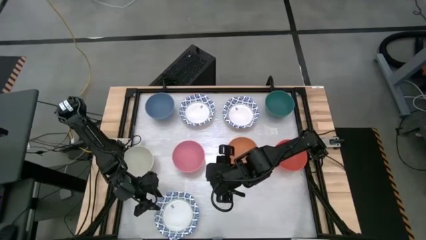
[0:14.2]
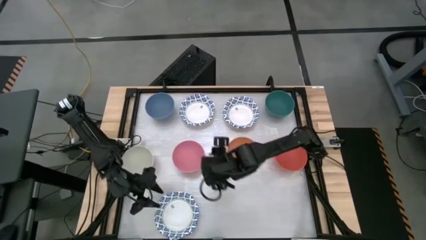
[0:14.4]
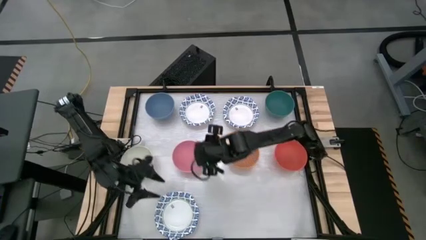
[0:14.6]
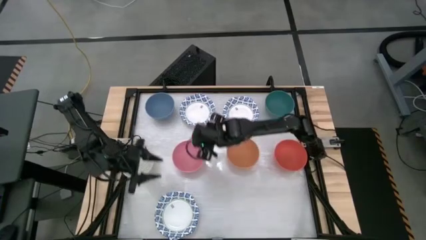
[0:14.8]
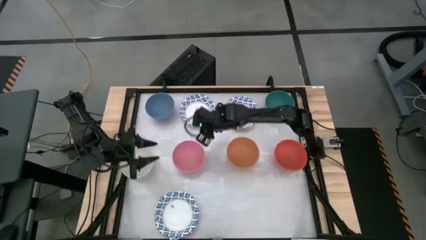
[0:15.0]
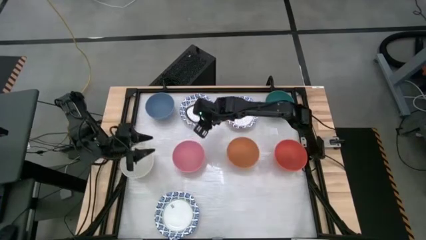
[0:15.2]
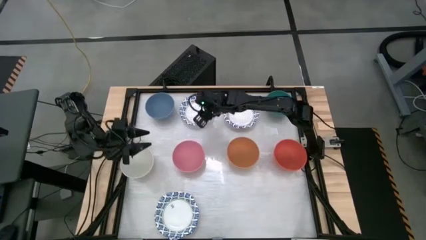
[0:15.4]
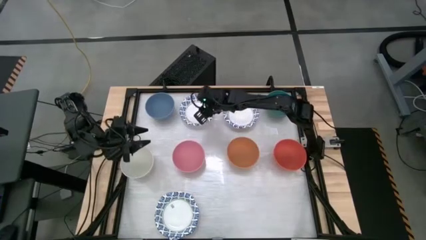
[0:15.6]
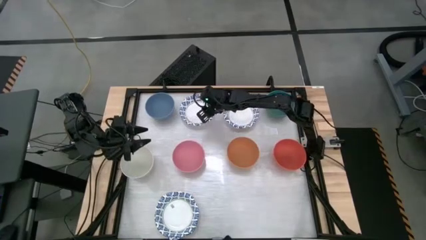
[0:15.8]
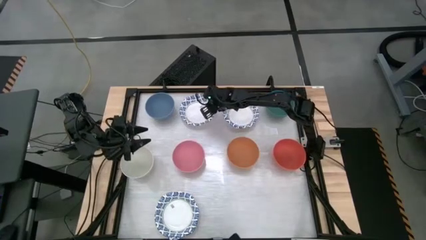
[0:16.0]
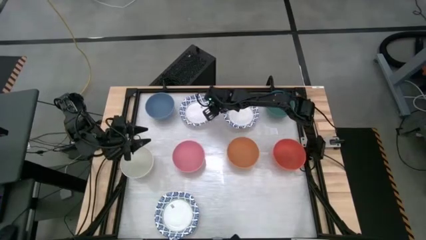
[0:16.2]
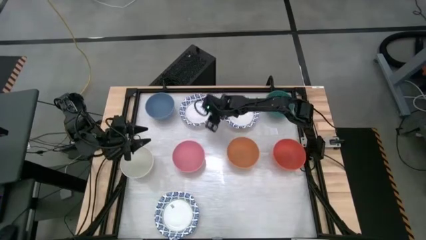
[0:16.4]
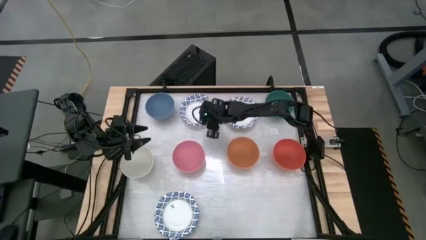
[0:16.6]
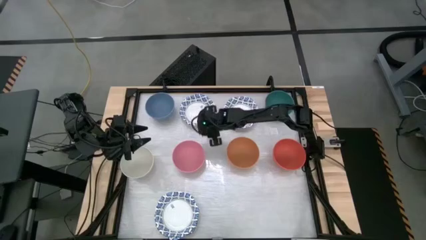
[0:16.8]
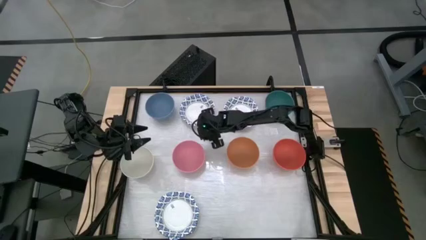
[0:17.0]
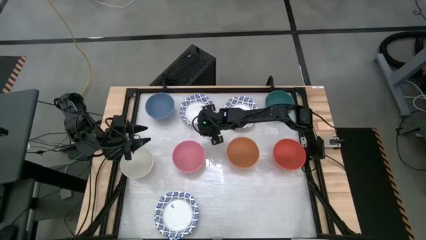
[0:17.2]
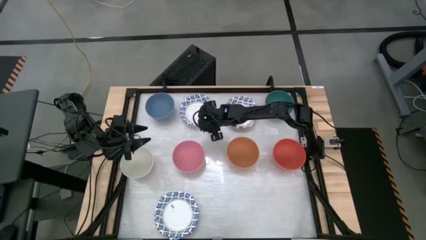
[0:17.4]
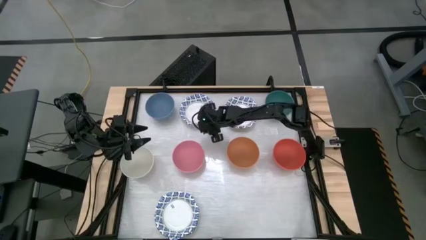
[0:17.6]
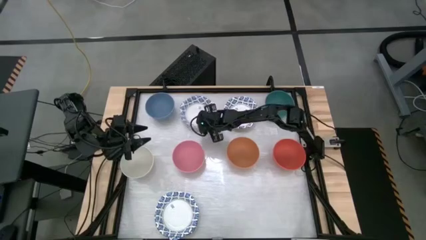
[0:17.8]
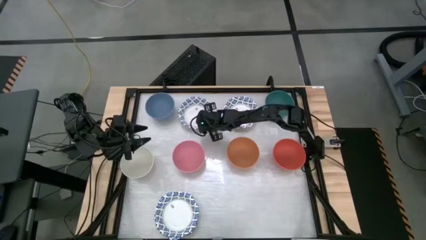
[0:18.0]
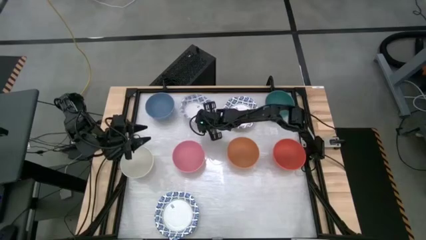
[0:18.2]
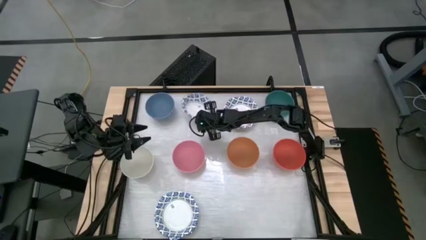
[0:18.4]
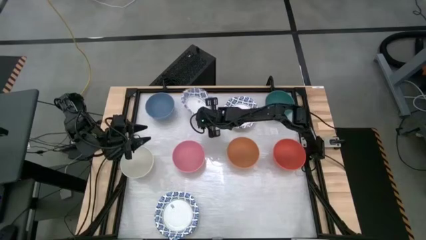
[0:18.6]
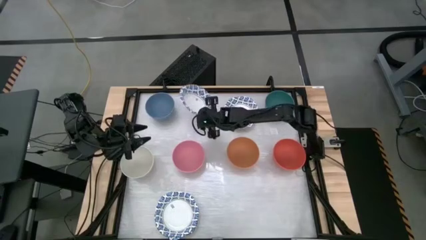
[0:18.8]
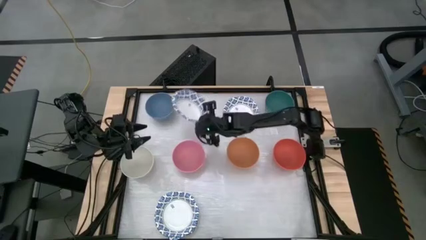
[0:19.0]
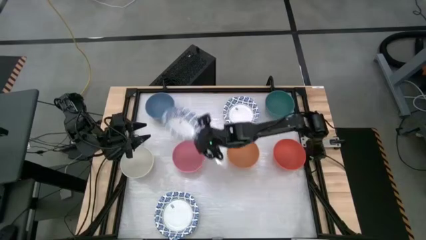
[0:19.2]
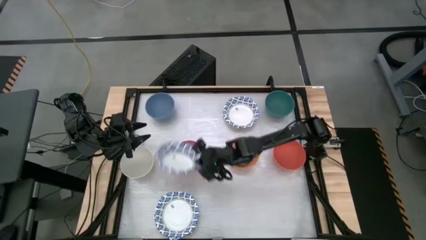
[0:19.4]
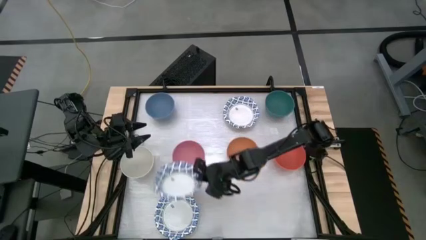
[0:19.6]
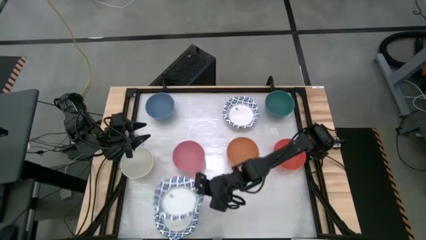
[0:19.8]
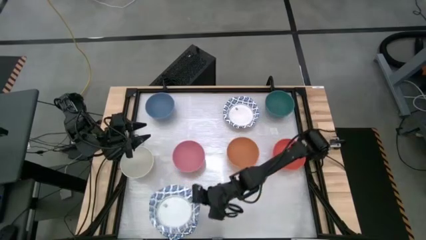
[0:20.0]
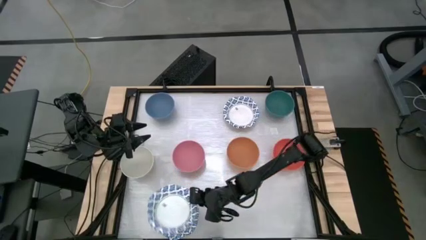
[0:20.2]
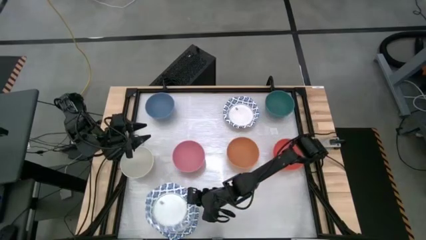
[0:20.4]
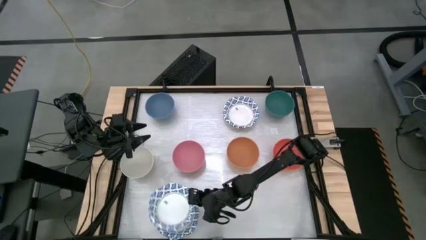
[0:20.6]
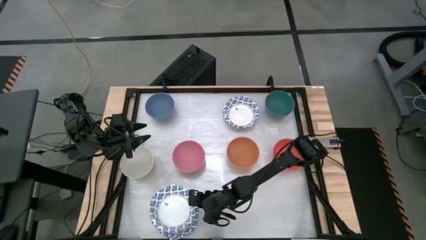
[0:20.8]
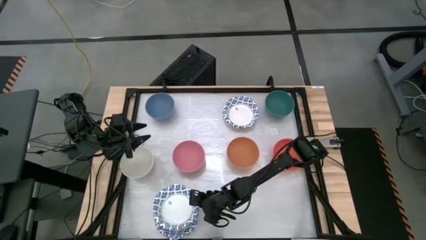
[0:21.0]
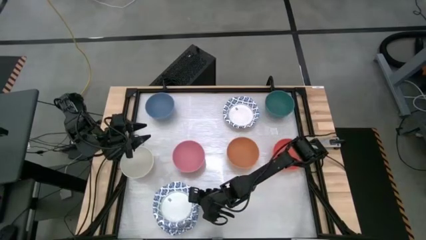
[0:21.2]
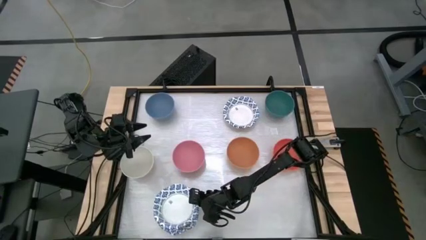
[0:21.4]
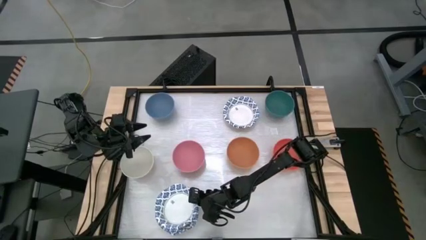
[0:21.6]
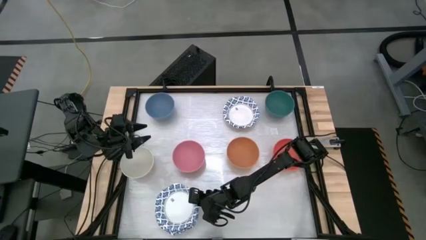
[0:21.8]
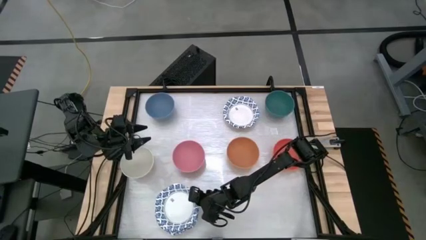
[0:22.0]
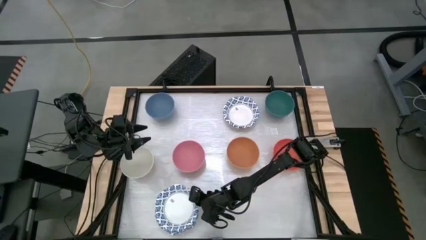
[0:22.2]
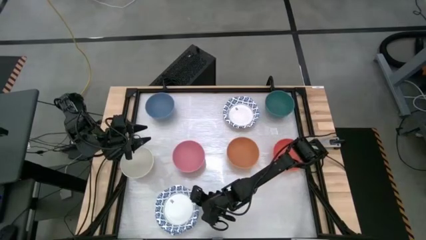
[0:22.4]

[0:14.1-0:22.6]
Stack the blue patterned bowl on top of the other blue patterned bowl

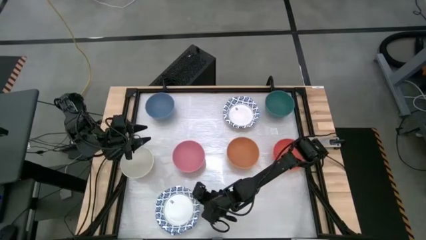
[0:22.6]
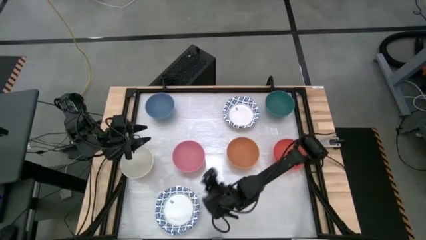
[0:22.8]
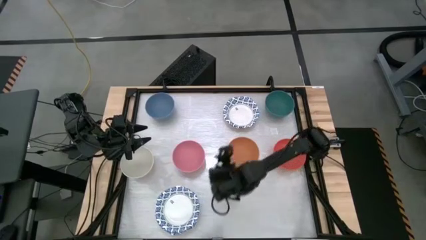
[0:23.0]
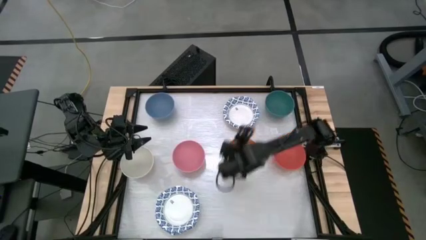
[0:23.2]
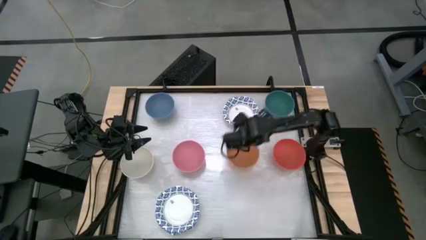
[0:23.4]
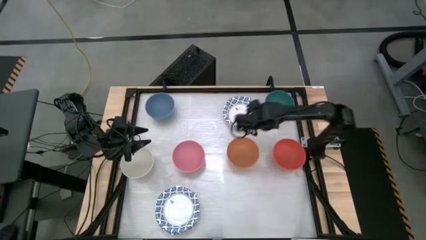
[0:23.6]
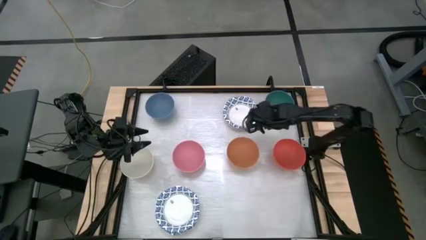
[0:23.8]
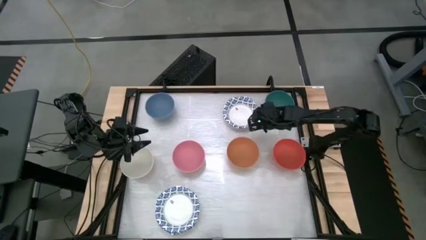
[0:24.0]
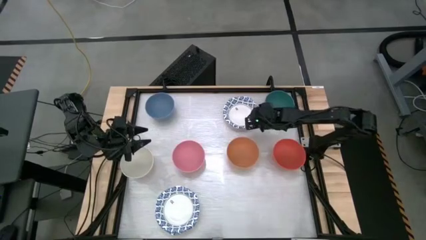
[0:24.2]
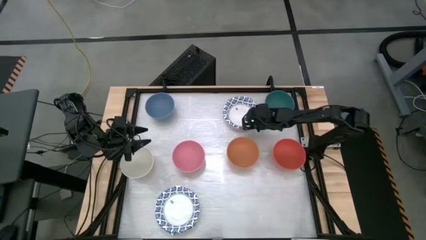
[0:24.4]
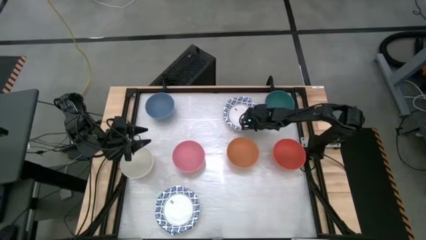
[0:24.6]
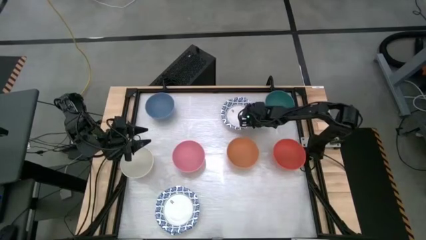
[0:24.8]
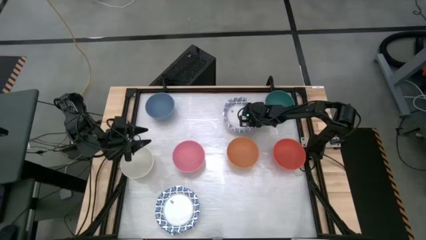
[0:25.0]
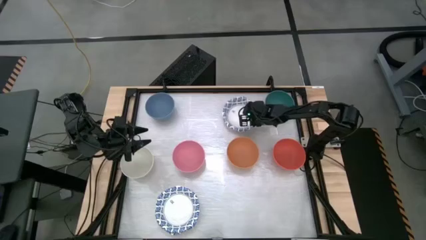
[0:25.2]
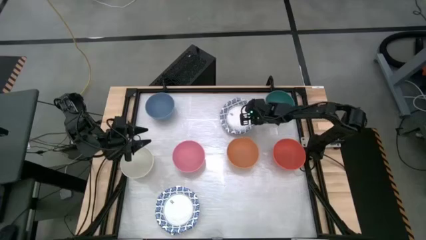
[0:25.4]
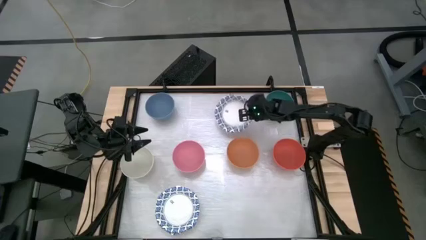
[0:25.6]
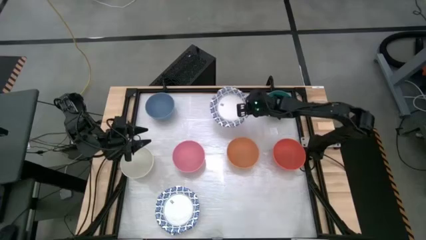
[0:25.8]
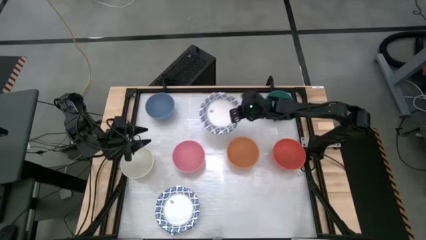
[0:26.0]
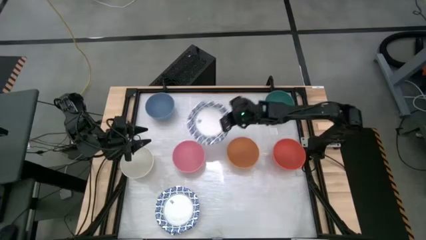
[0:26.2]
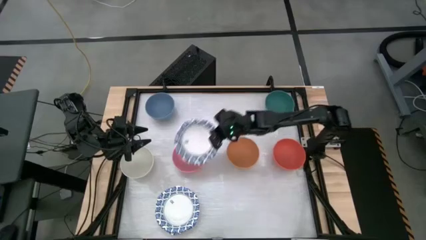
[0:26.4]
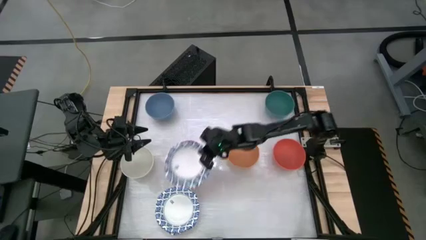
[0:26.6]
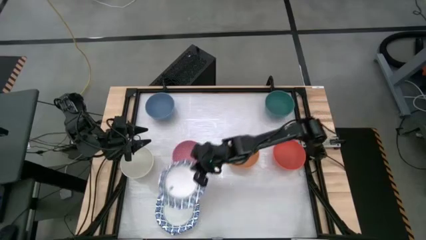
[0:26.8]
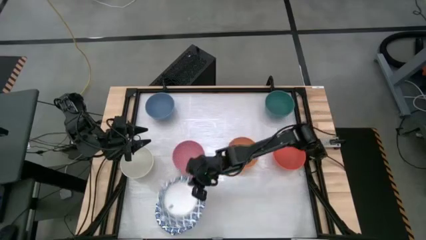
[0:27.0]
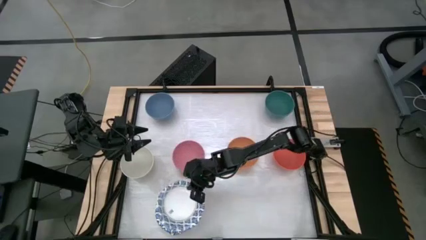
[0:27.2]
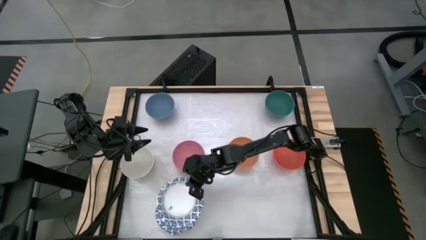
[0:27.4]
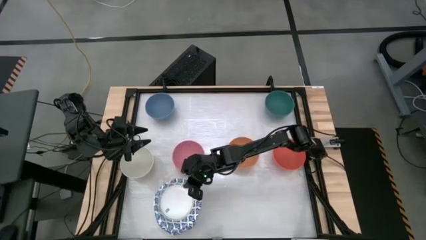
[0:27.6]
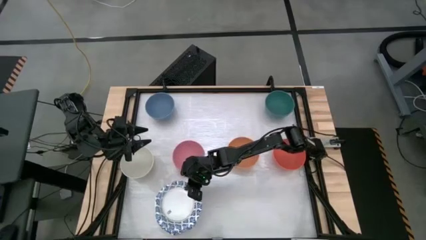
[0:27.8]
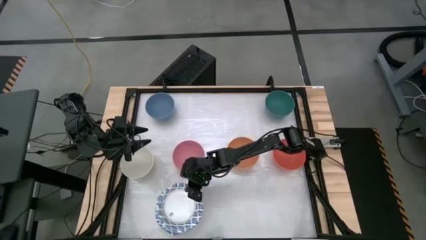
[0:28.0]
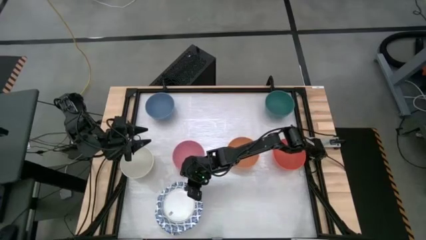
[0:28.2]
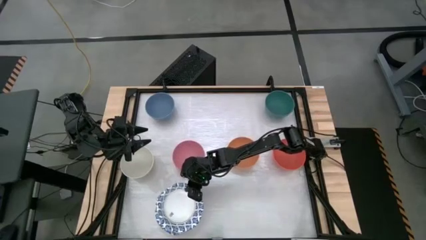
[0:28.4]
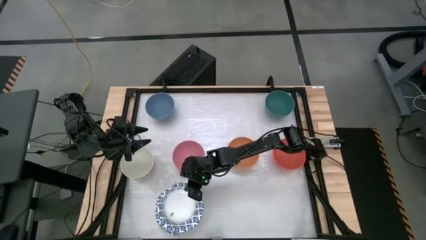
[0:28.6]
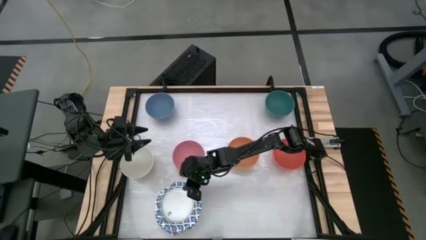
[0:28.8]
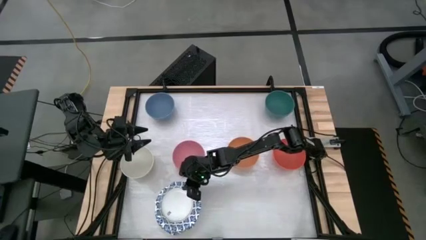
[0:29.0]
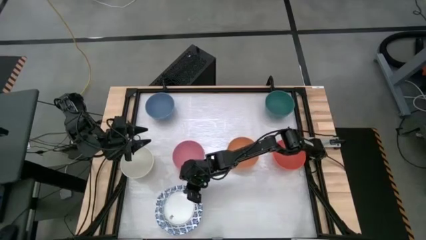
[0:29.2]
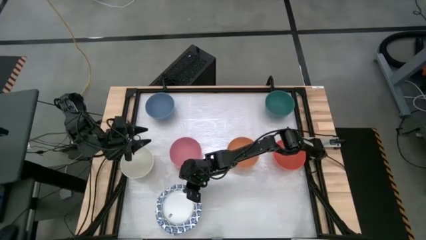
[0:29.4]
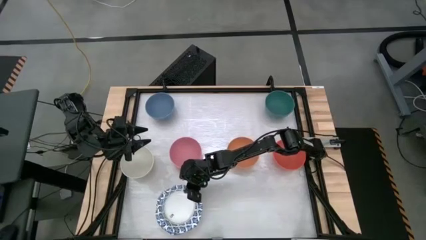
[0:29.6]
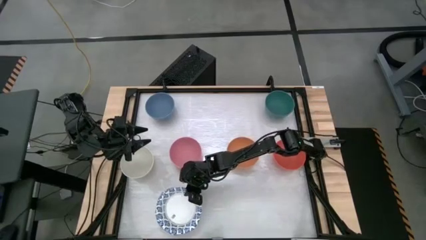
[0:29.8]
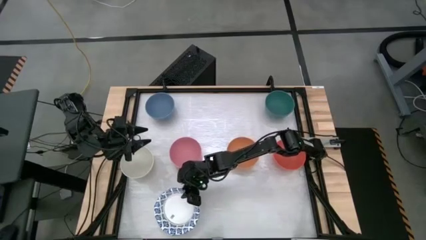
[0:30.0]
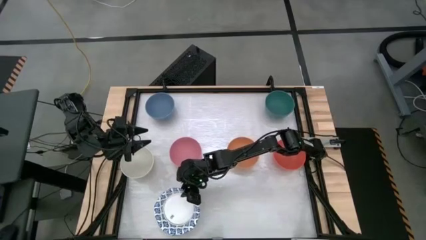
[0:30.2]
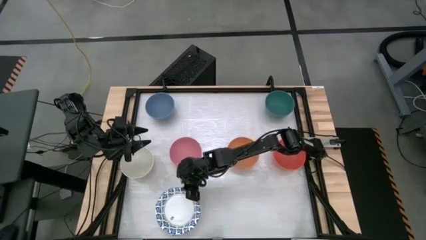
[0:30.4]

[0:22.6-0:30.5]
Stack the blue patterned bowl on top of the other blue patterned bowl
